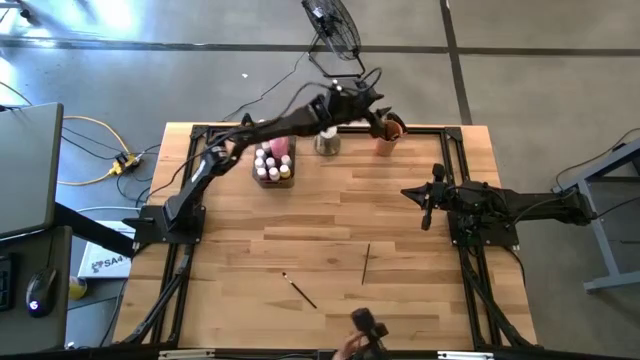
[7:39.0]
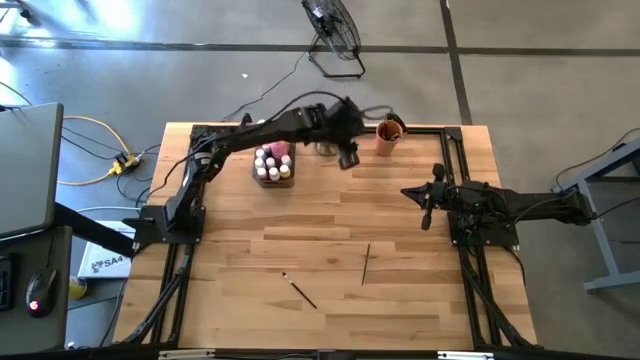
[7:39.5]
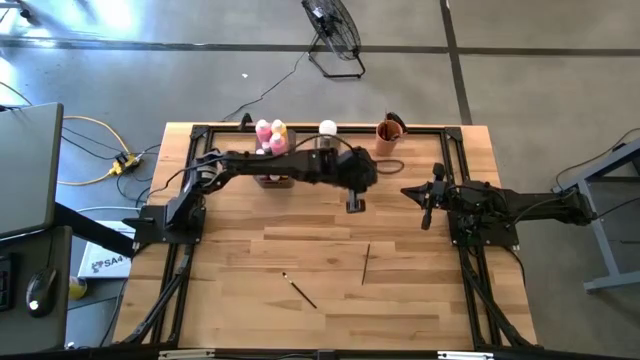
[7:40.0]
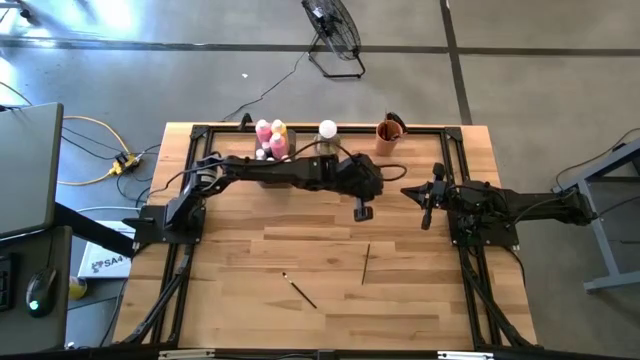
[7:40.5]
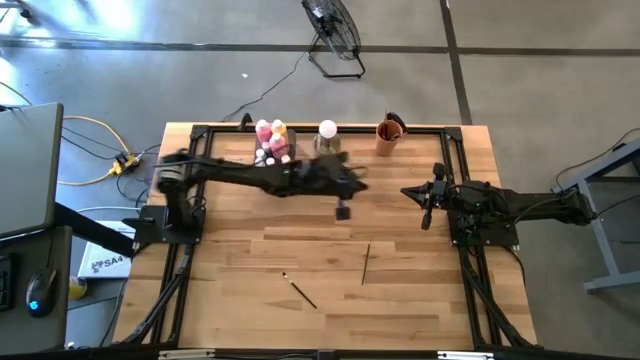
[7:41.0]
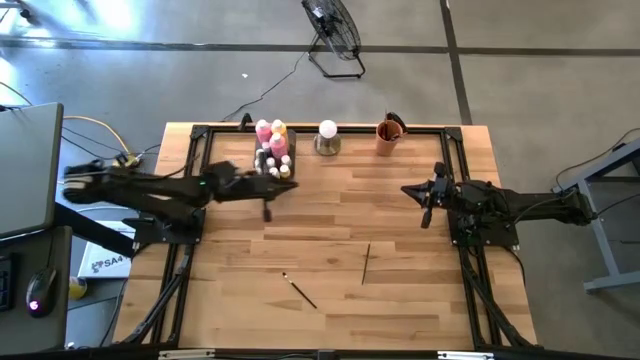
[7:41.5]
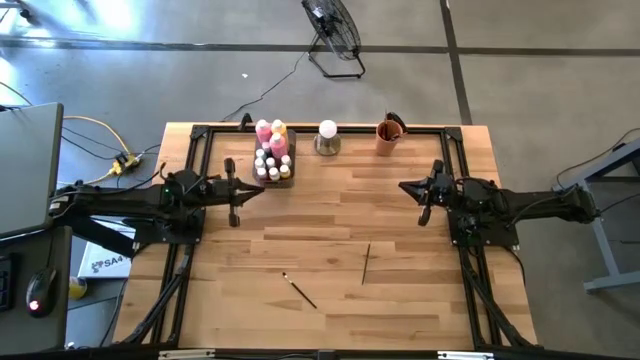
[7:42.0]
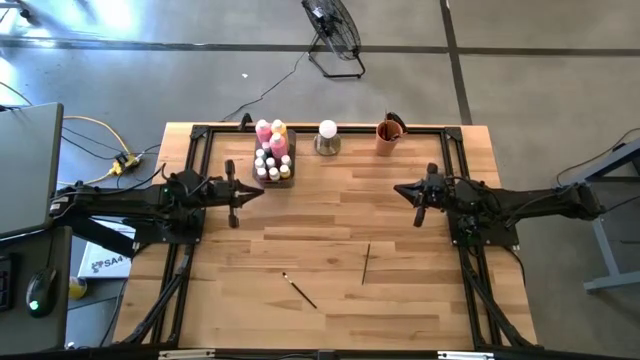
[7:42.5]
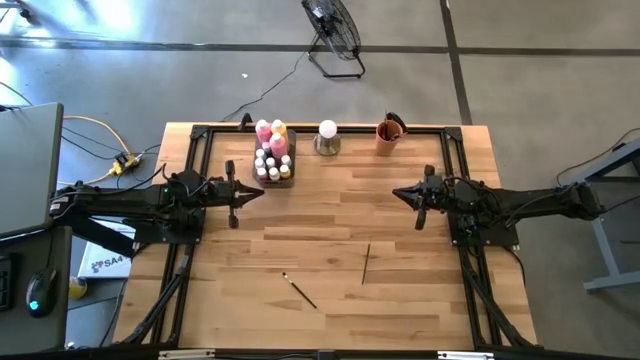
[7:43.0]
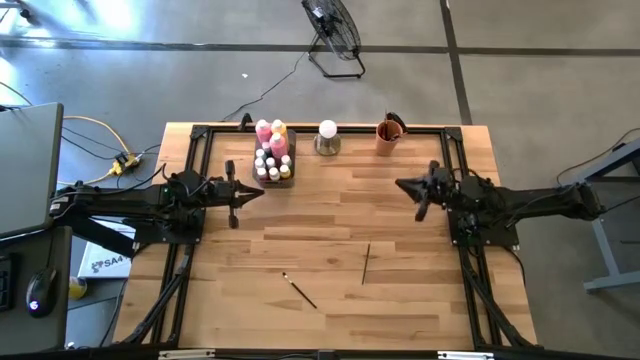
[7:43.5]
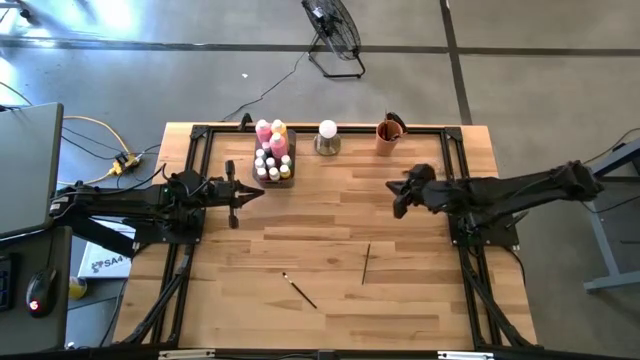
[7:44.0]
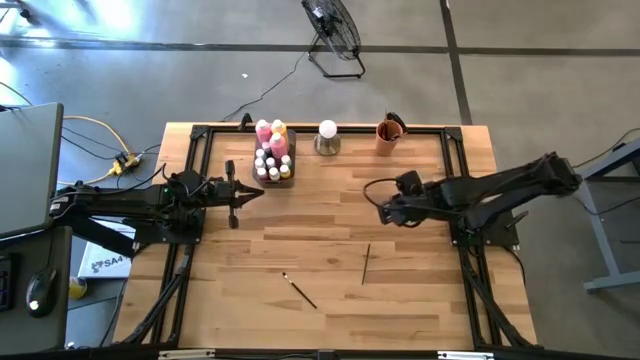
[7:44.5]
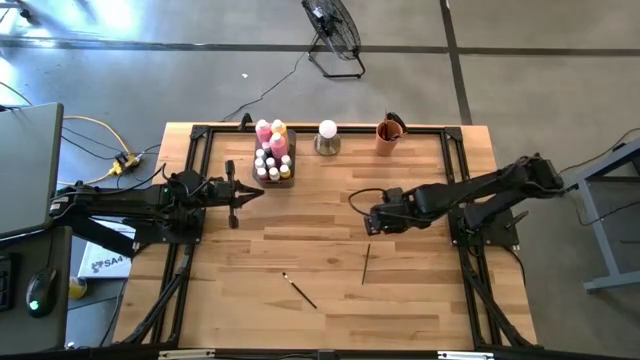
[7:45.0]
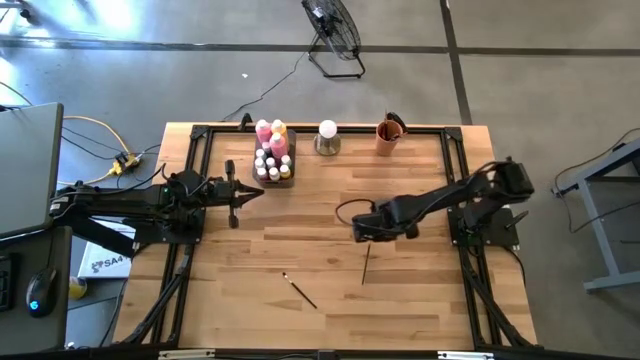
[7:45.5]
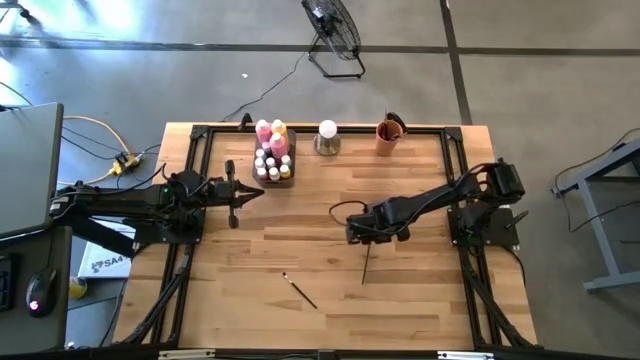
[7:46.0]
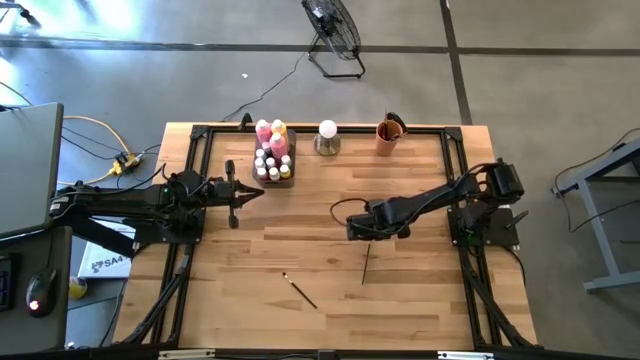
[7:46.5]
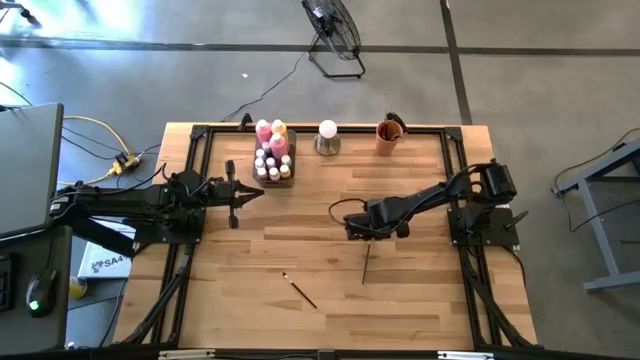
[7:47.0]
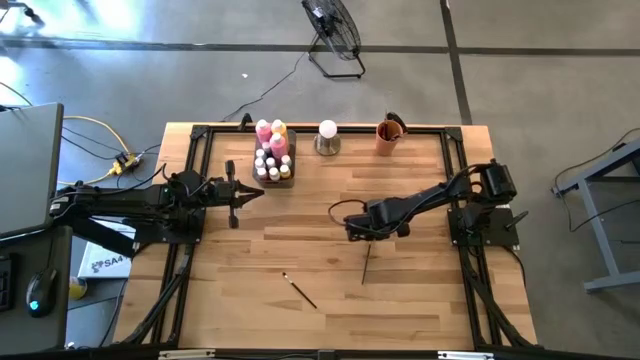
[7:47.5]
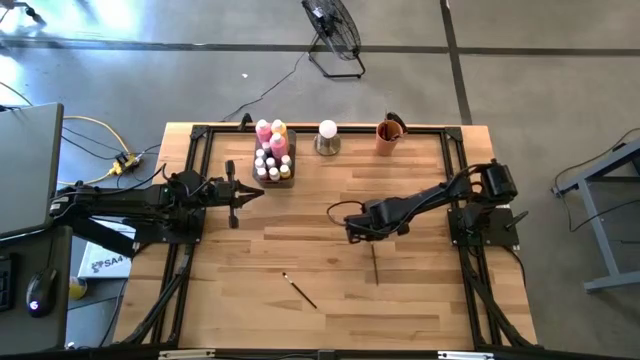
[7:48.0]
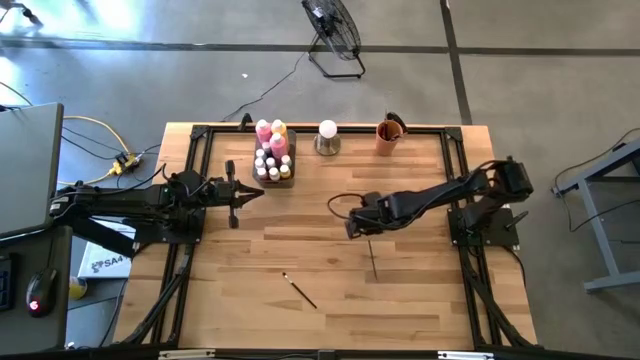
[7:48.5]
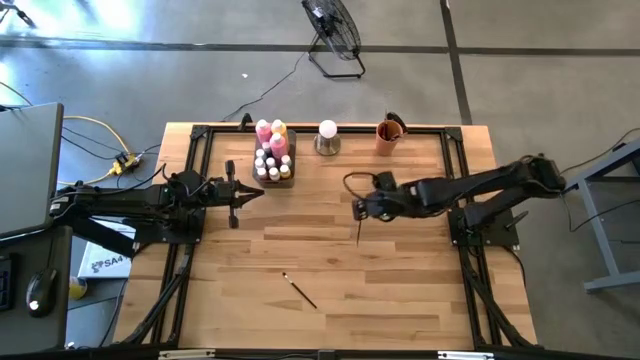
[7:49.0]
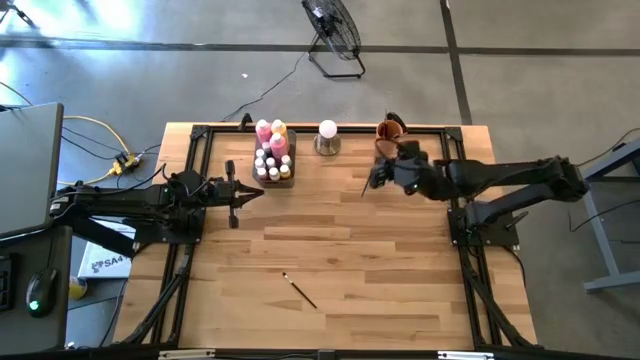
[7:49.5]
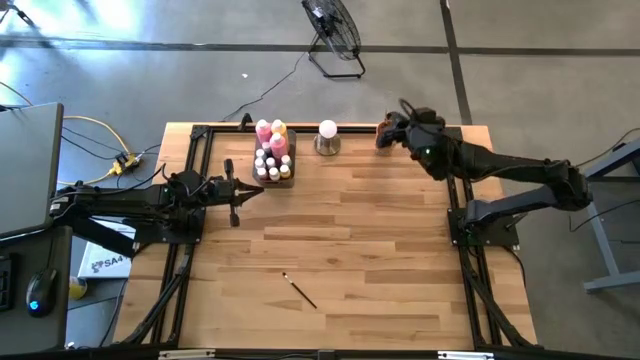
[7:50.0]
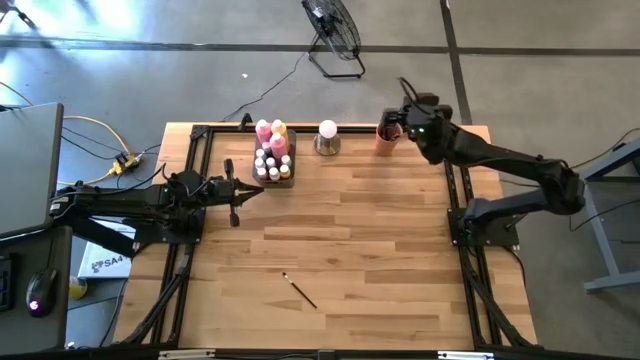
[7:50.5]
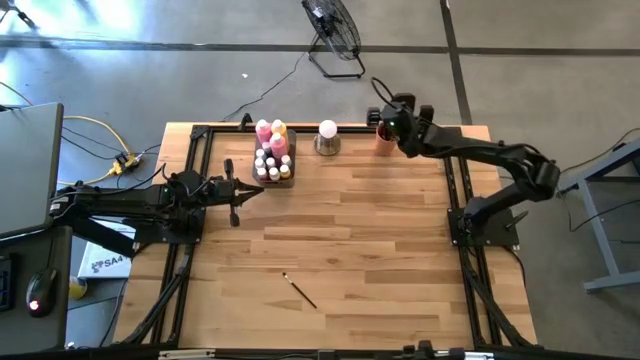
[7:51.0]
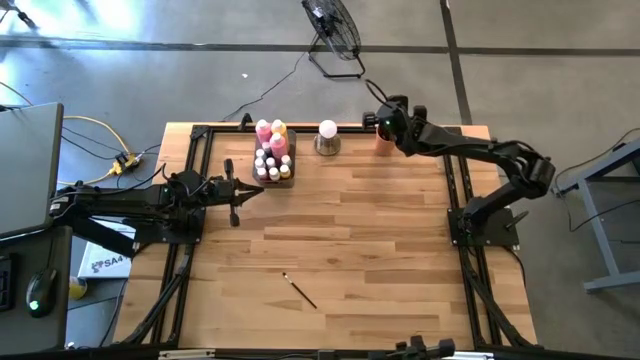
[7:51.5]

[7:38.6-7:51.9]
Task: Pick & Place Paint Supplies
Put the orange paintbrush into the orange cup

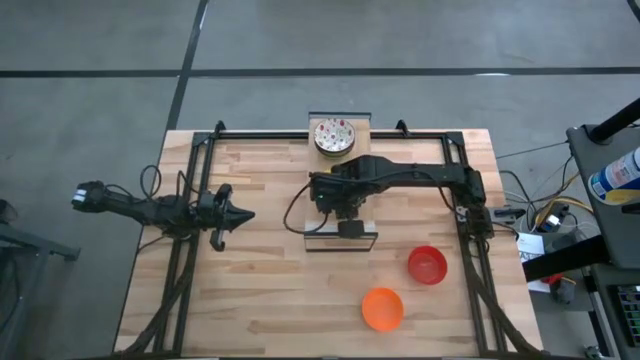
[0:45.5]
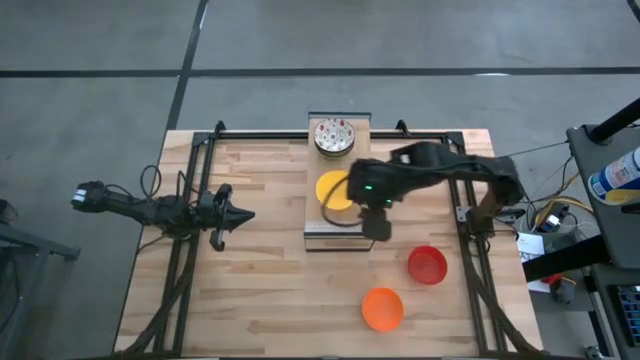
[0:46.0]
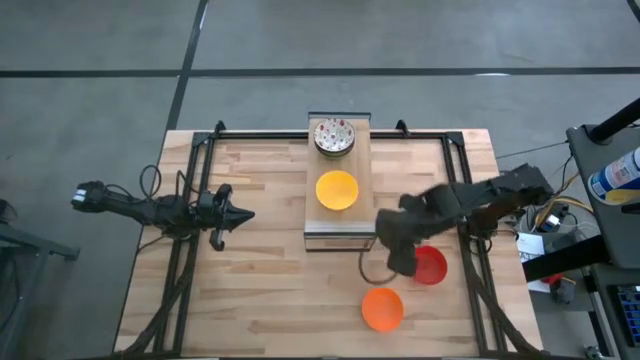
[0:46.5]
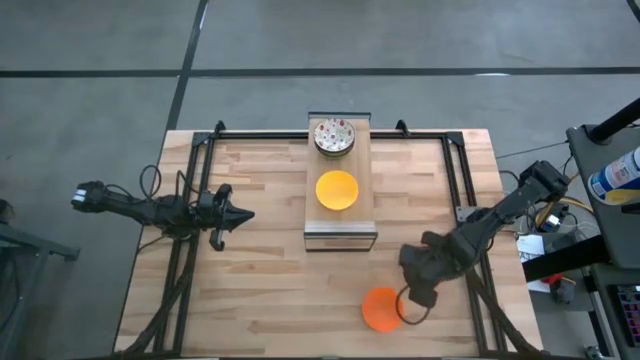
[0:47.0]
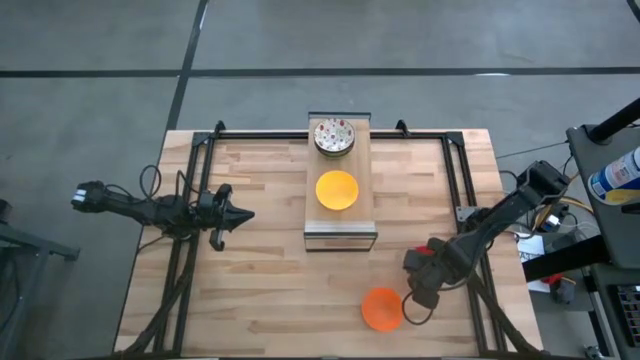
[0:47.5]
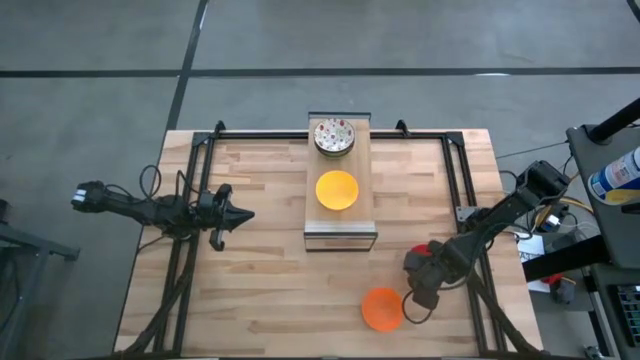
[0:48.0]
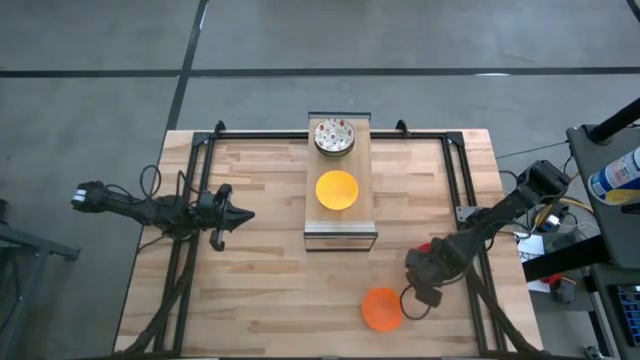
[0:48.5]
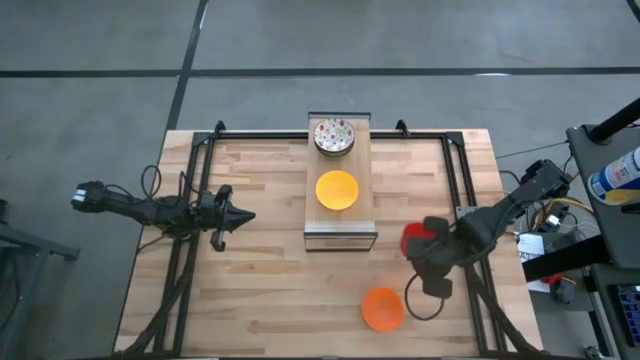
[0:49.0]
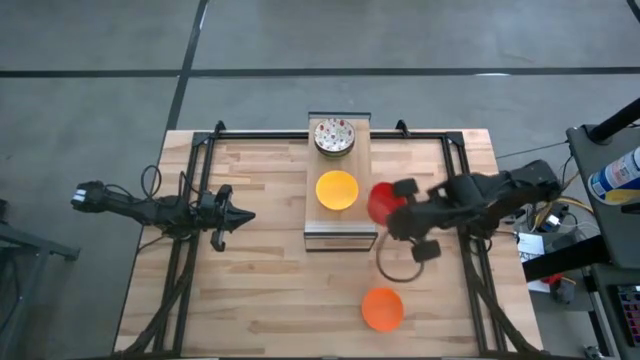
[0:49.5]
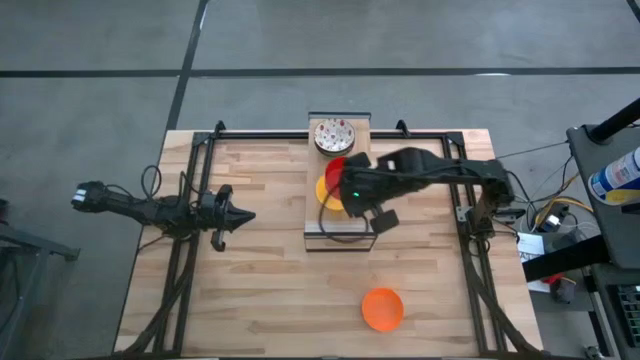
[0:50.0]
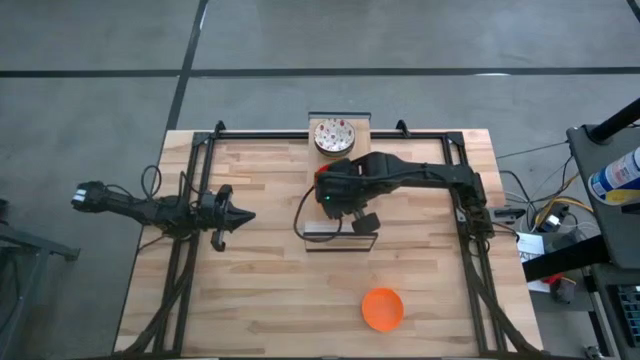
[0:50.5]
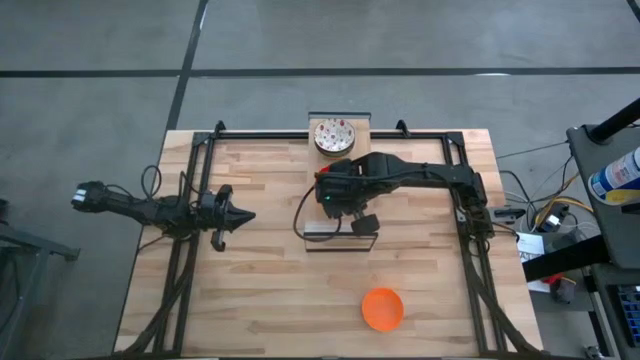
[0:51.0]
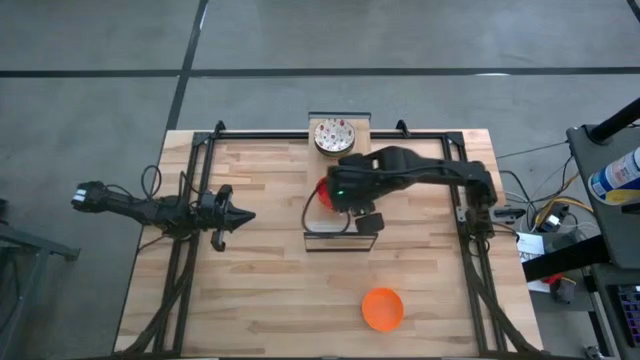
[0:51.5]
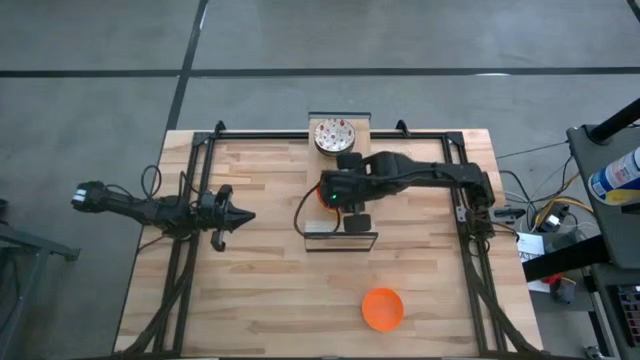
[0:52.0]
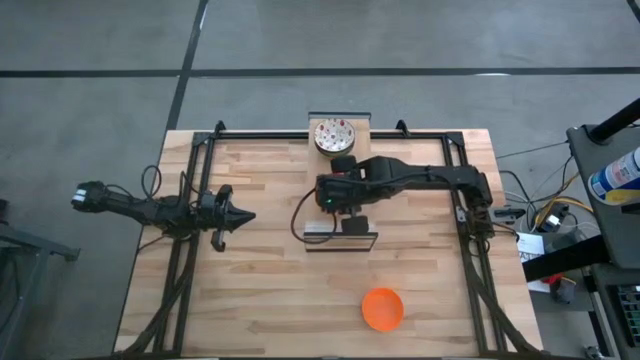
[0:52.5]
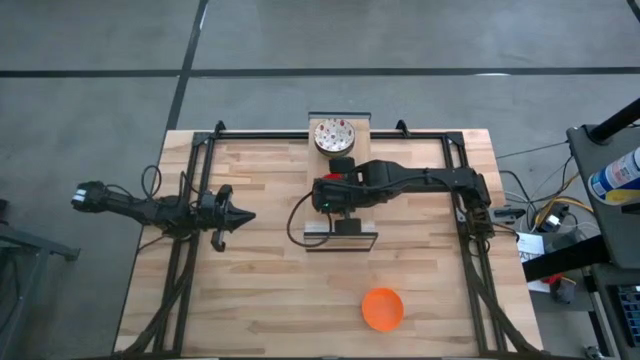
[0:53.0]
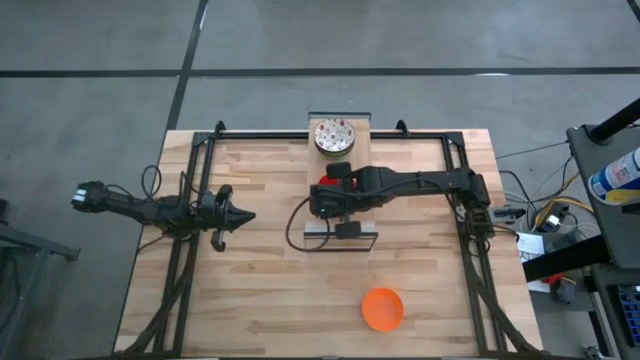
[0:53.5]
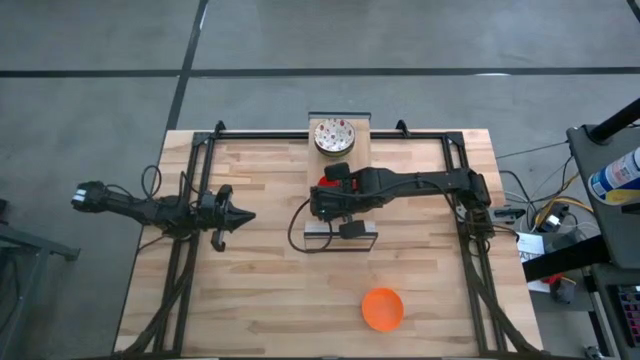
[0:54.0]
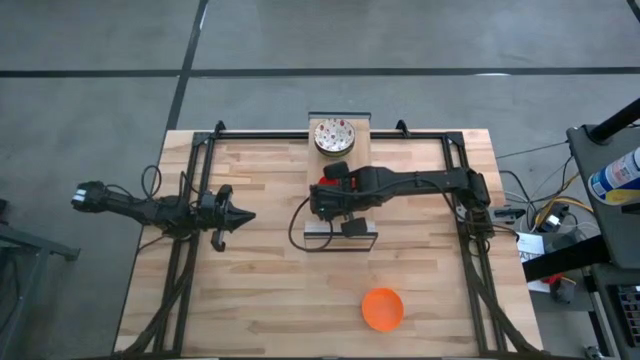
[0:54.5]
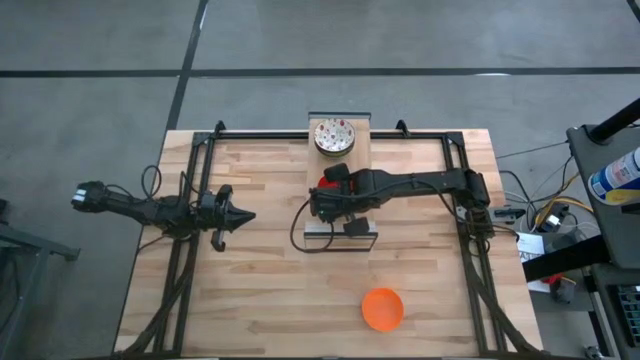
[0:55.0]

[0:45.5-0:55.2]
Task: Pick & Place Mini bowls
Stack the red bowl on top of the yellow bowl on the shelf
